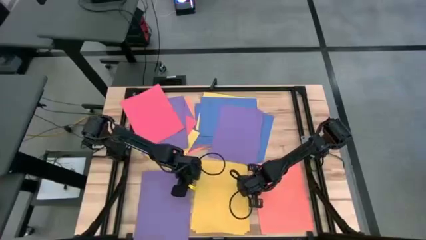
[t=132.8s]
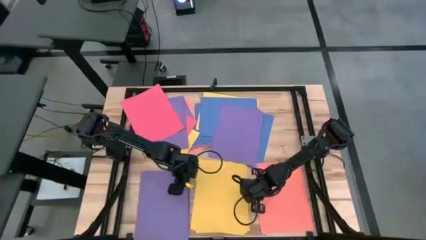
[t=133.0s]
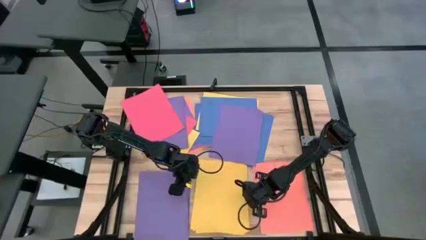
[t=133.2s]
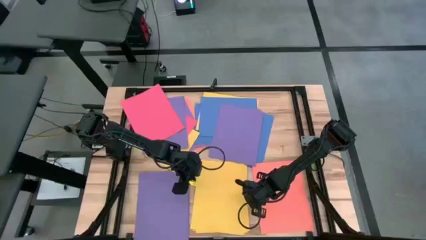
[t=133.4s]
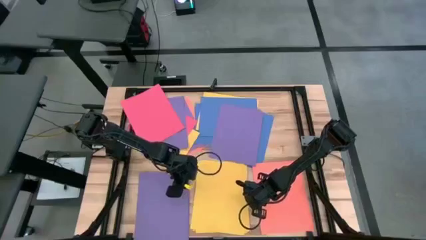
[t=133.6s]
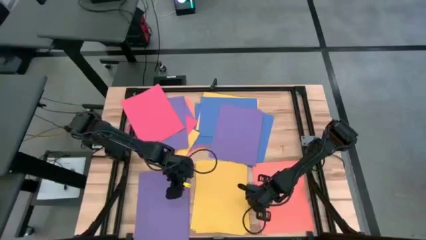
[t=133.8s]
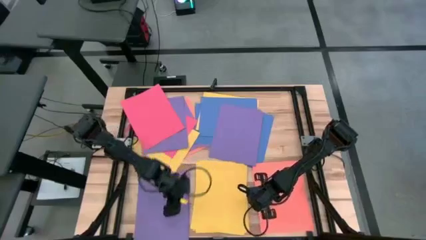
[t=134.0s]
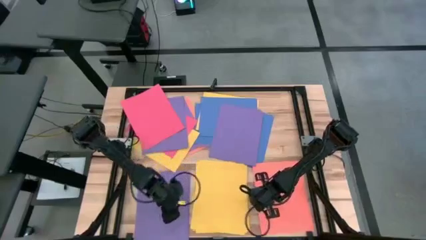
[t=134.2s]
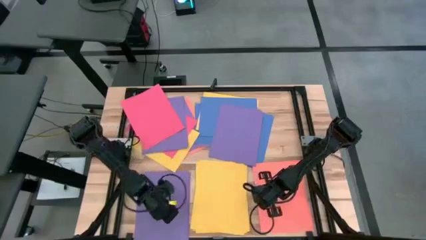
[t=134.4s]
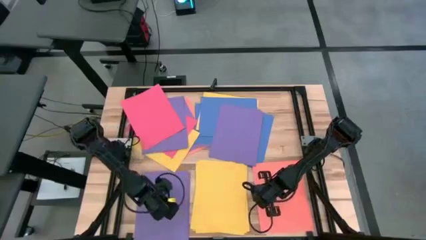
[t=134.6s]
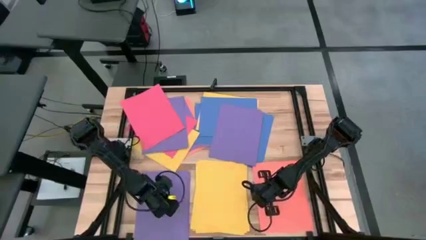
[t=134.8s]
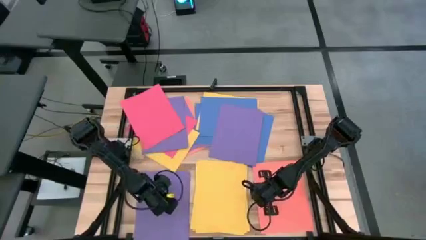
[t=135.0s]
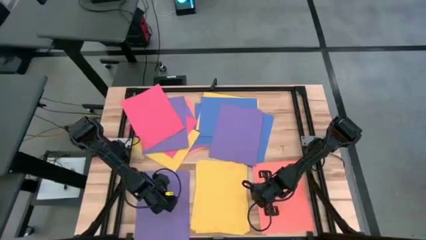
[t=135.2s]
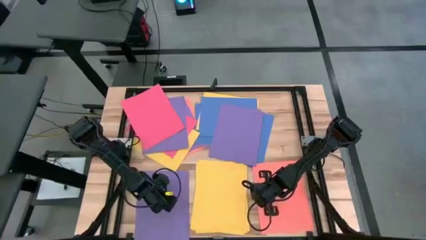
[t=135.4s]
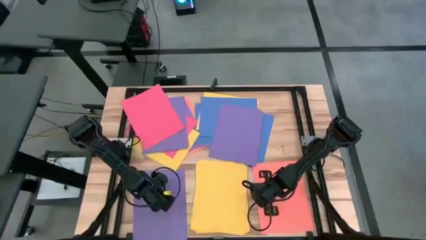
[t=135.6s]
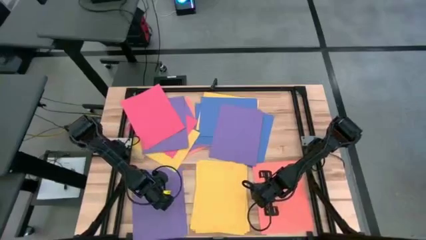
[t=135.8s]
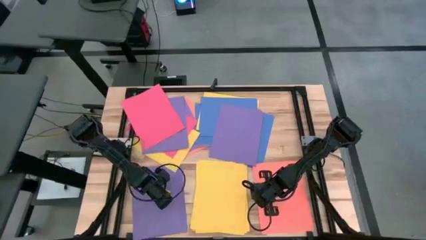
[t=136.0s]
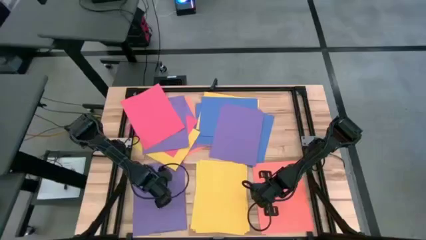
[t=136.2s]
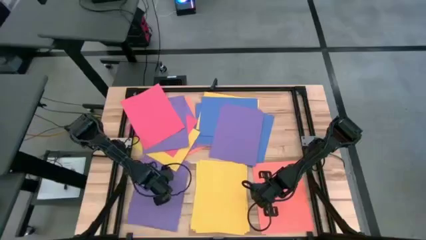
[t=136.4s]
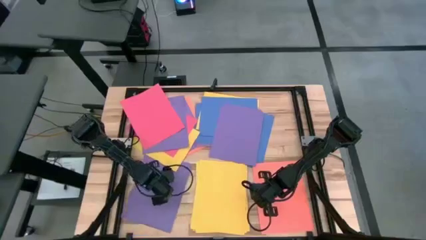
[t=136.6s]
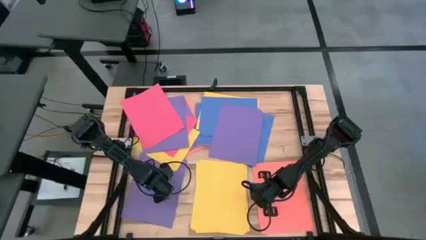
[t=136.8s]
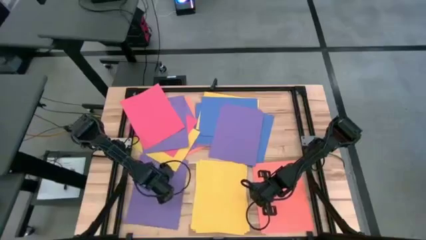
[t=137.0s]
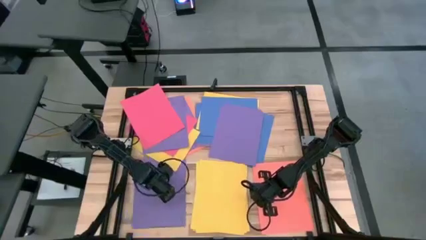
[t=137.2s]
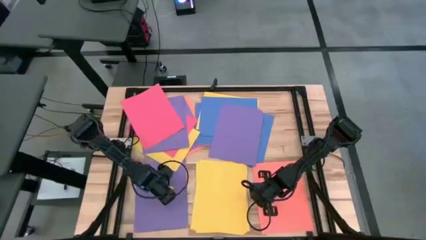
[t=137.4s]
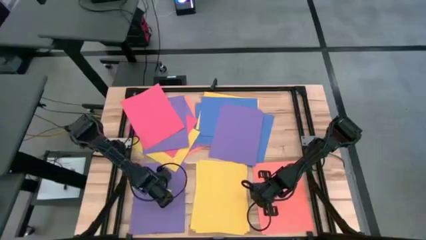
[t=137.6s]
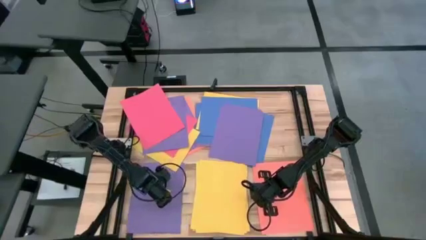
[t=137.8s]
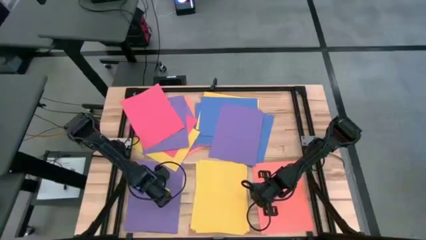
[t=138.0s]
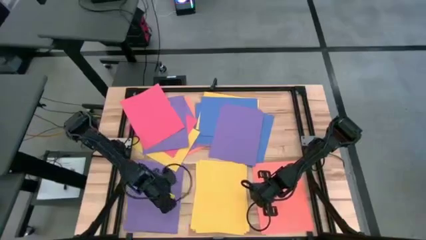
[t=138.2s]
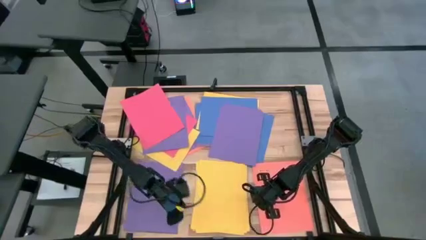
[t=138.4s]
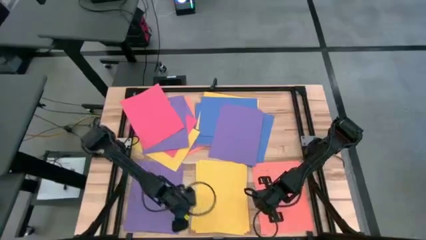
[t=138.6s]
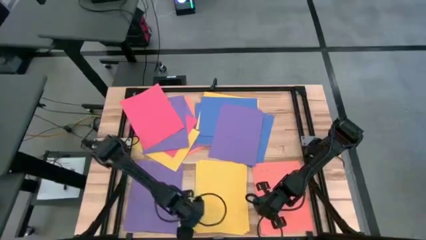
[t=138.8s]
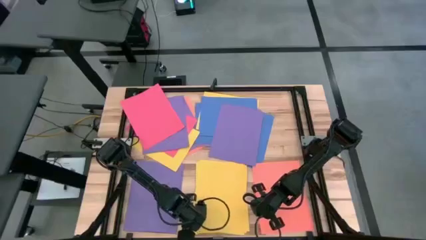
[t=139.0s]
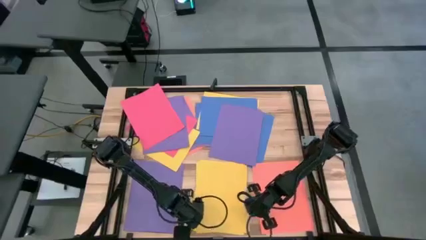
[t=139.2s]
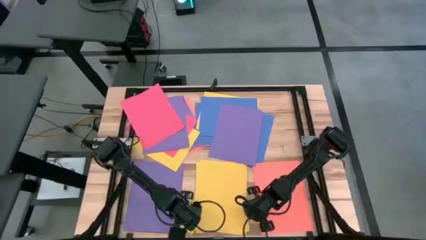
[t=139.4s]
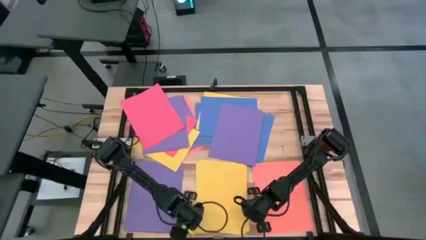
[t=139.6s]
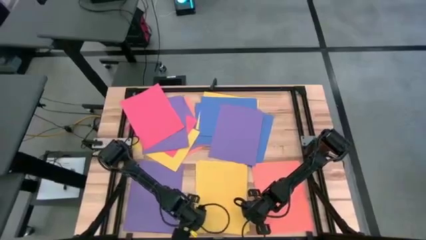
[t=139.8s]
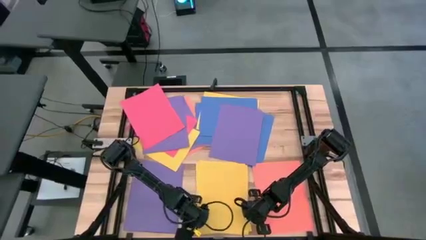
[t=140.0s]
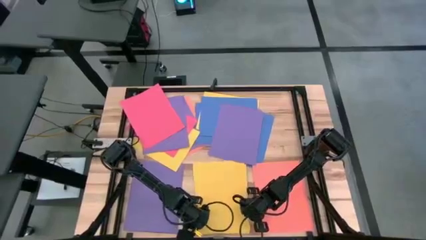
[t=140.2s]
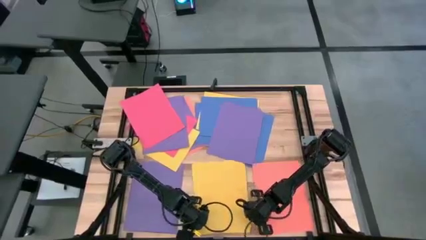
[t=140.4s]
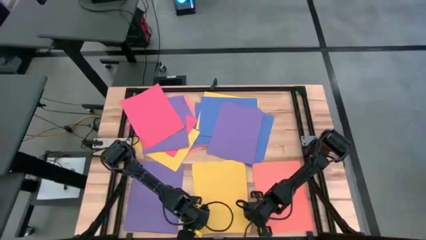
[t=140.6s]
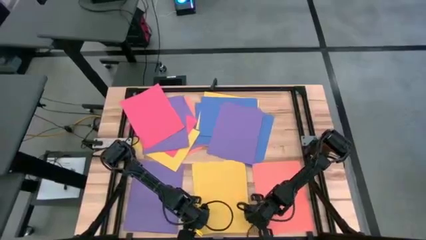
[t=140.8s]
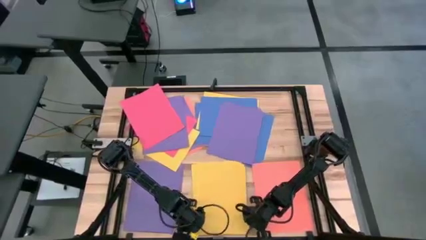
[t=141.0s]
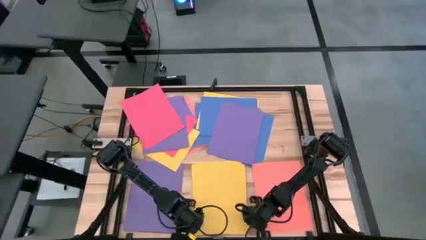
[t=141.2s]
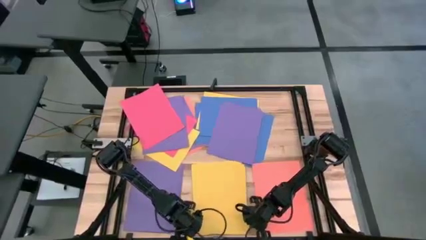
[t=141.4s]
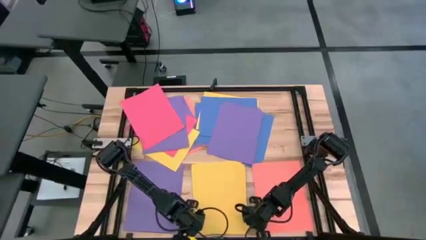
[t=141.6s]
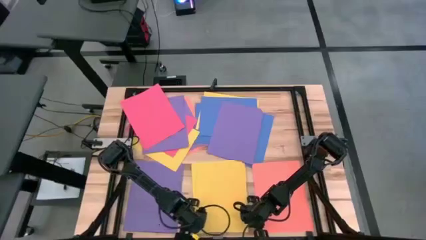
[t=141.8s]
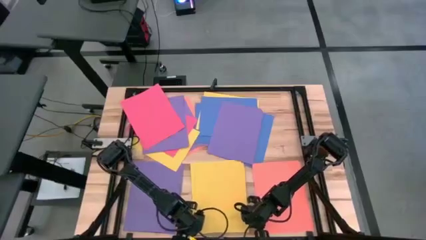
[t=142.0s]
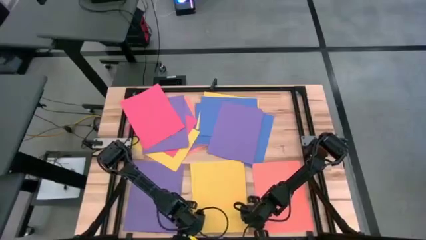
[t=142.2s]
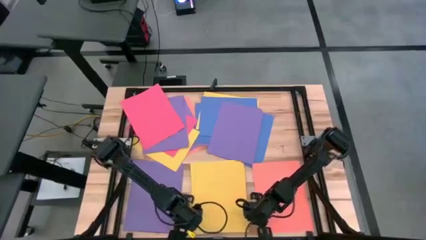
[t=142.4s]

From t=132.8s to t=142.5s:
Task: Organize paper
Adjust the stacked papers

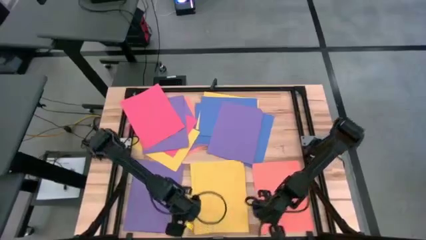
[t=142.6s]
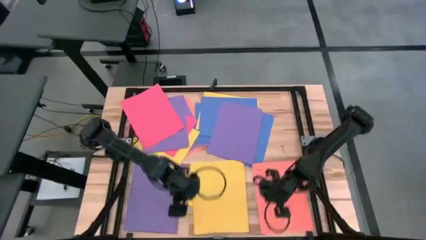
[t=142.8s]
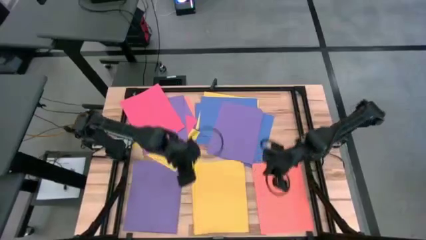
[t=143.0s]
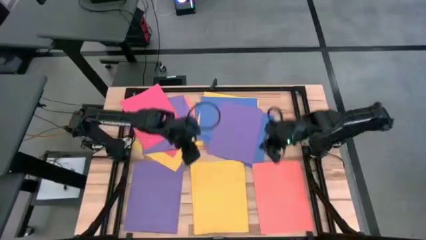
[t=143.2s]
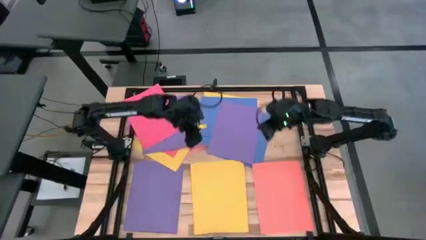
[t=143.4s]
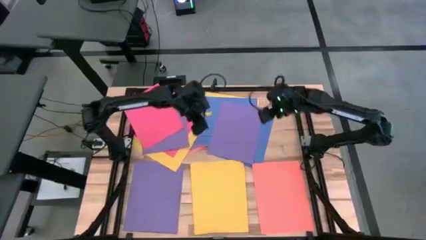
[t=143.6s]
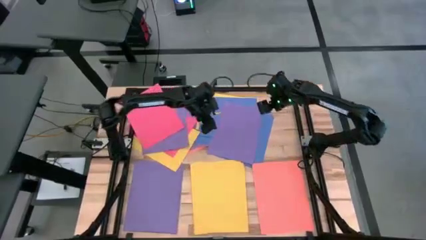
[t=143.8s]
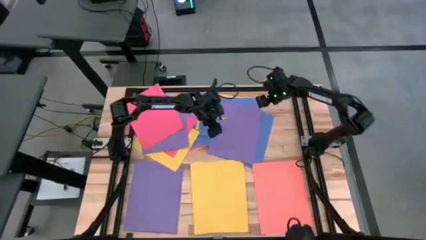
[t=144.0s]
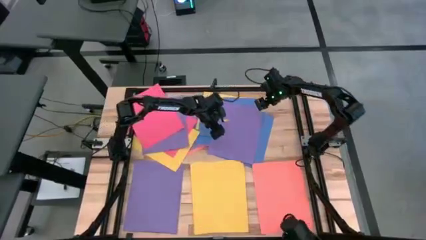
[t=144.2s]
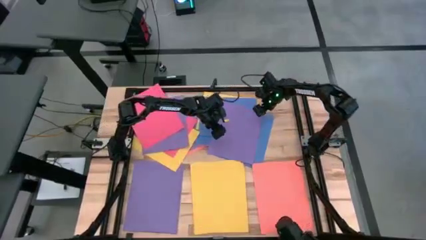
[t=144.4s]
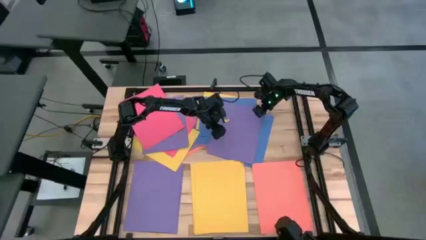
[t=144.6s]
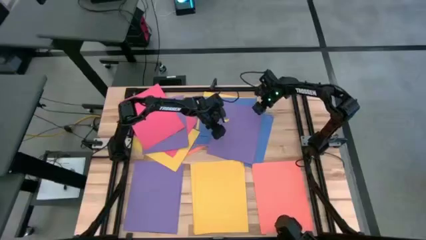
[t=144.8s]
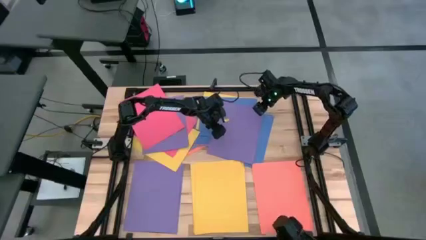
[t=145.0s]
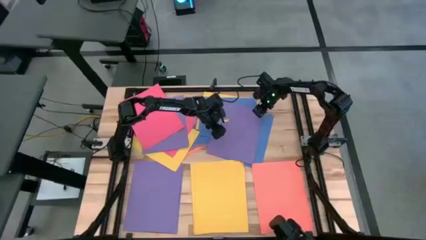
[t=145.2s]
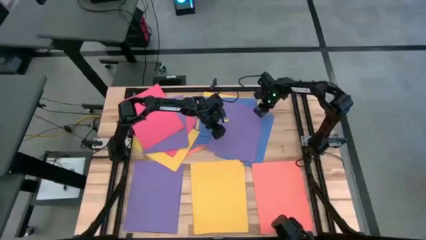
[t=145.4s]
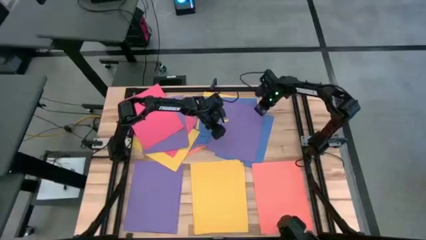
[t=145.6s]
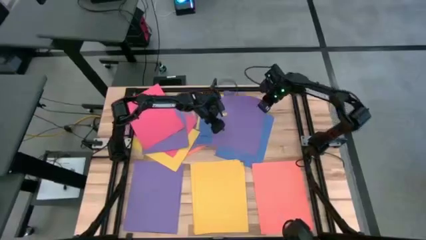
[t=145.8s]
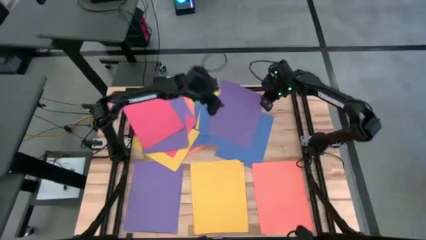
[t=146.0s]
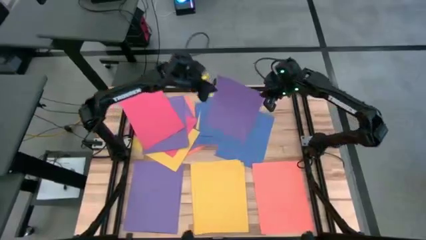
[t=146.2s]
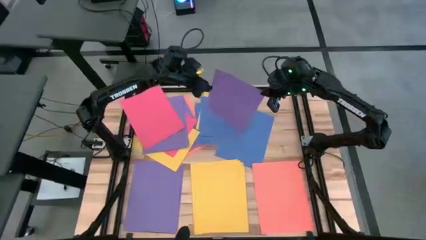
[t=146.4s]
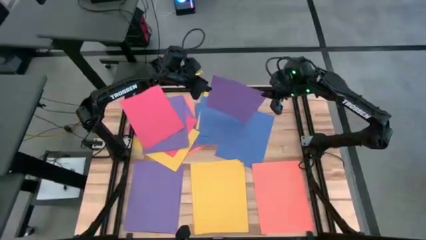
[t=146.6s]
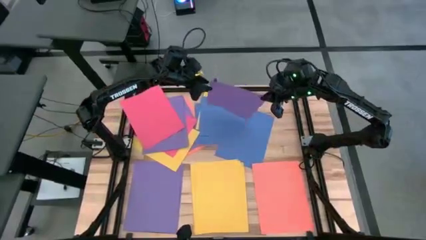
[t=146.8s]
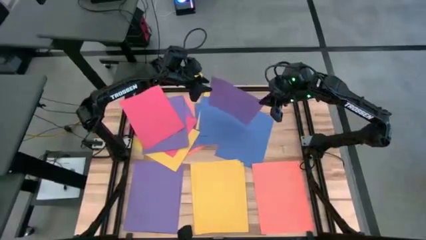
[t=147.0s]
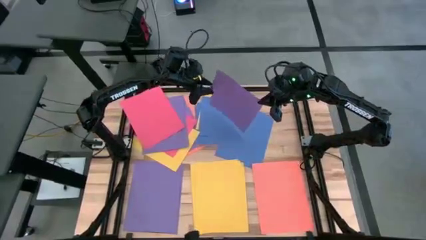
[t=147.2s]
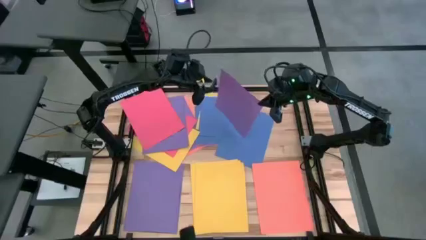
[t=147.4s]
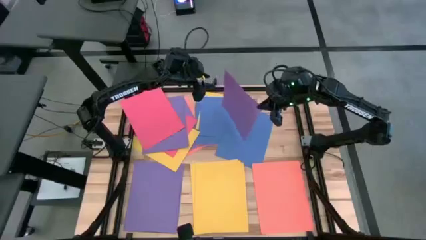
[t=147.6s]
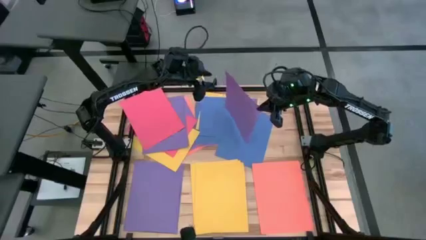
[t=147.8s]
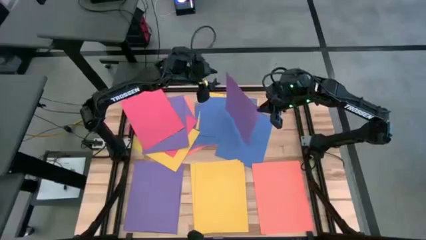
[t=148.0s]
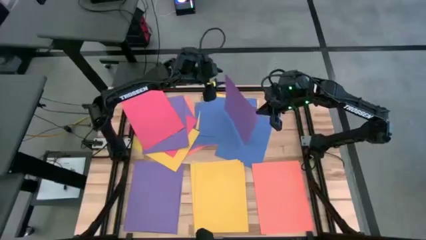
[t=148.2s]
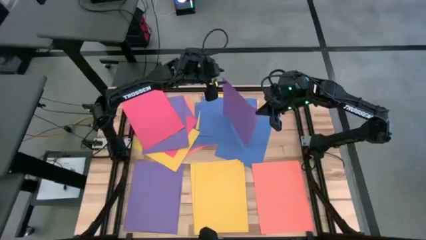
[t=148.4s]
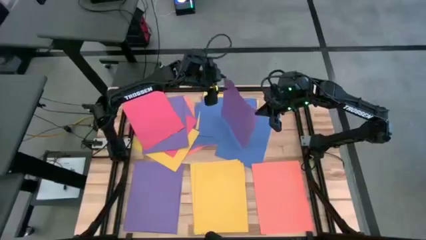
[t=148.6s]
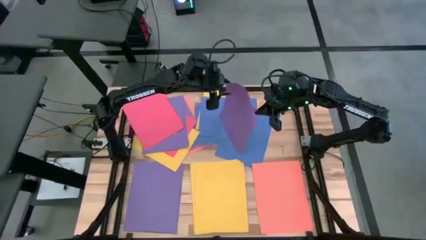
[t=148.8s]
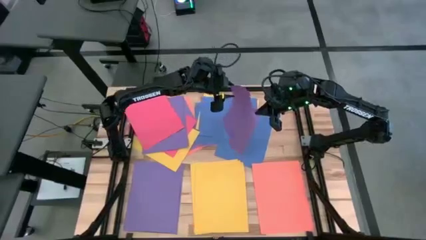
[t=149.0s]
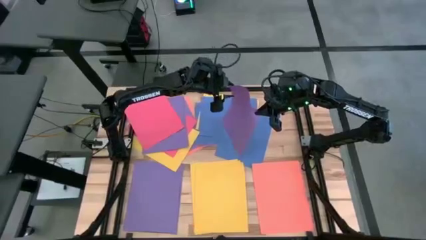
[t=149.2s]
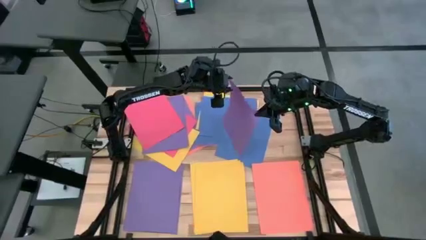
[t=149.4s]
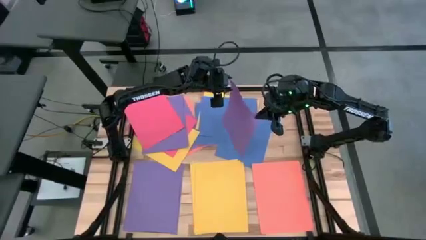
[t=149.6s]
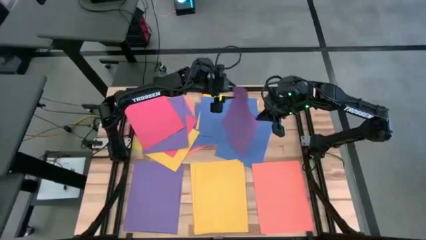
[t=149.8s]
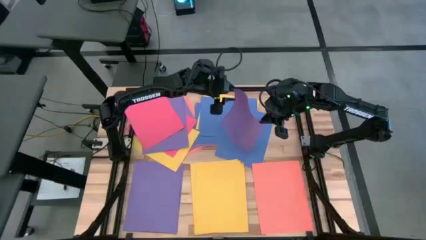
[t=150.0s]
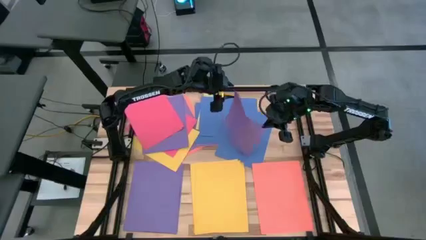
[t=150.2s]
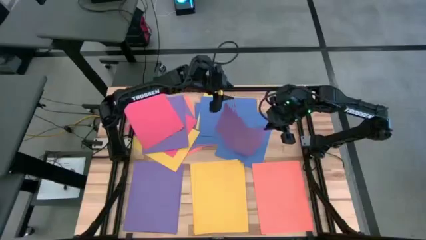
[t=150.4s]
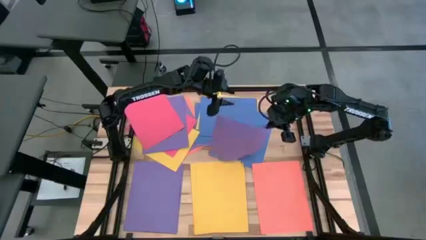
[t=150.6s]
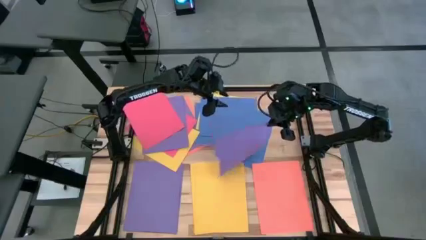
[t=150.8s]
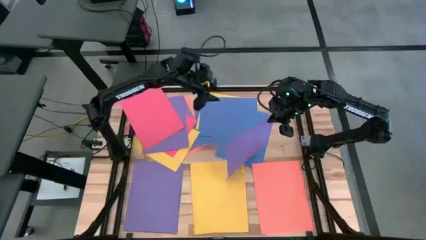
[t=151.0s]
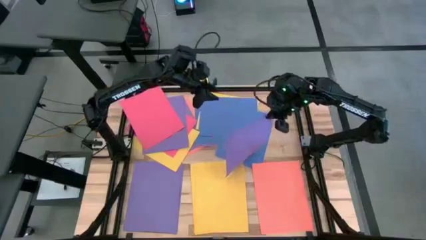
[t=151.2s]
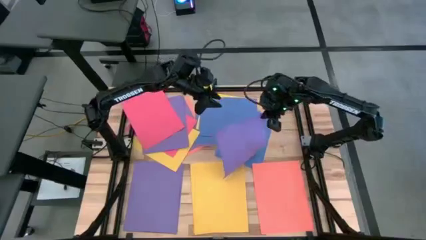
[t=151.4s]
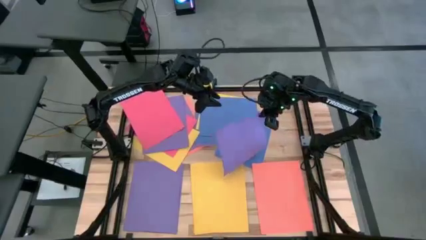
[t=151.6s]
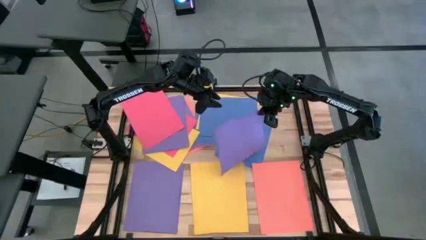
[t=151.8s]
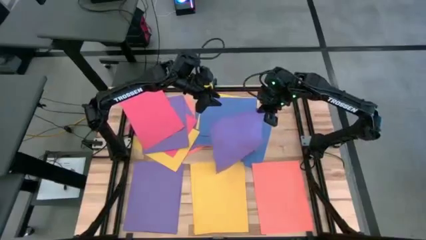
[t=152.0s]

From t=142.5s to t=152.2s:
Stack the purple paper on top of the purple paper
